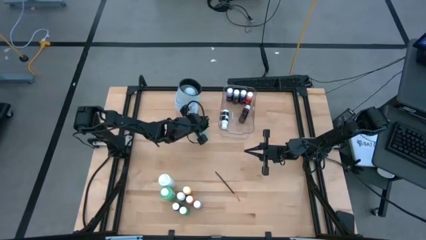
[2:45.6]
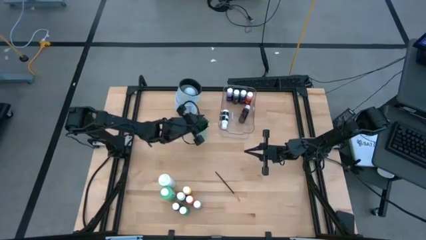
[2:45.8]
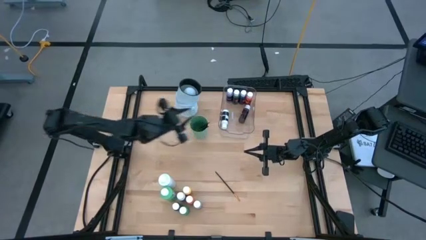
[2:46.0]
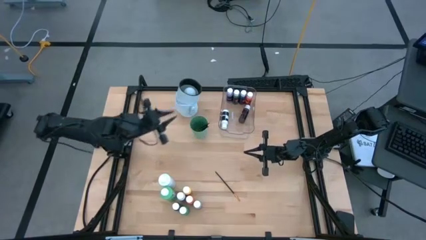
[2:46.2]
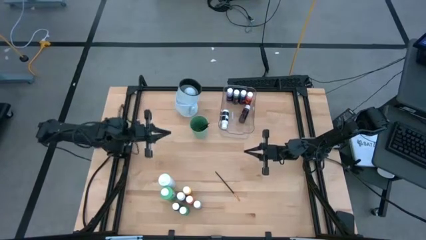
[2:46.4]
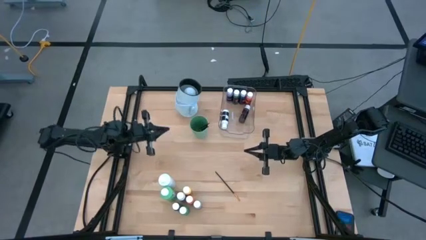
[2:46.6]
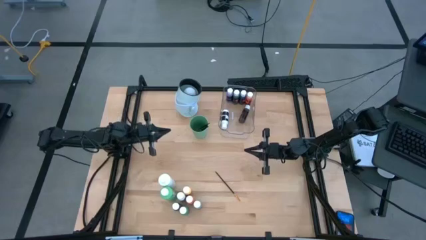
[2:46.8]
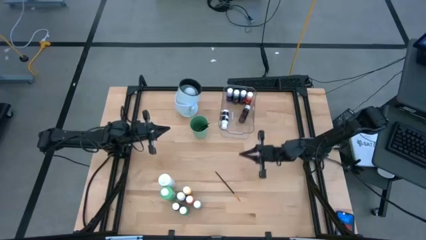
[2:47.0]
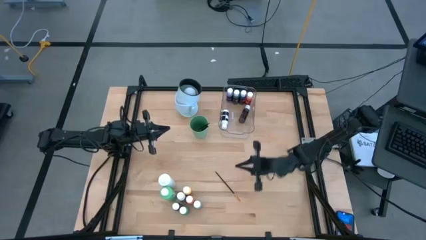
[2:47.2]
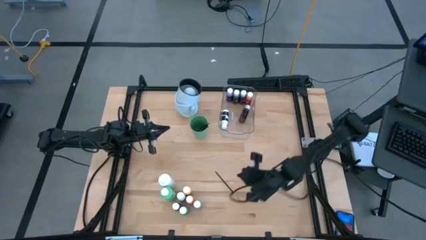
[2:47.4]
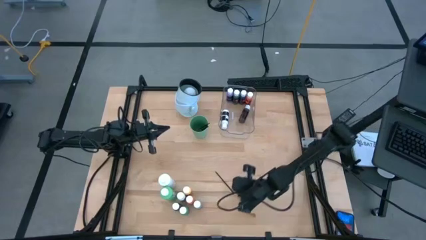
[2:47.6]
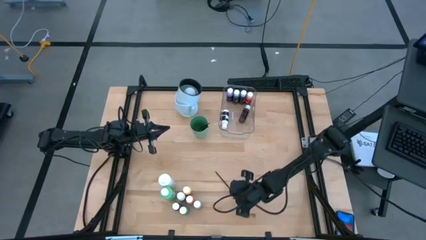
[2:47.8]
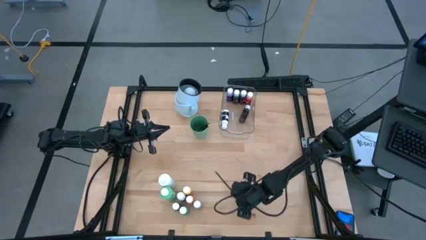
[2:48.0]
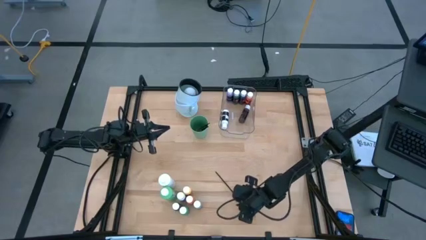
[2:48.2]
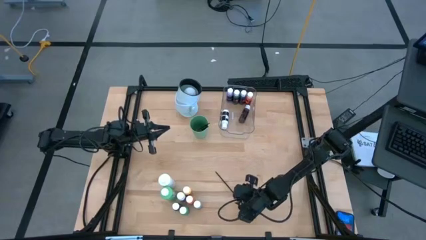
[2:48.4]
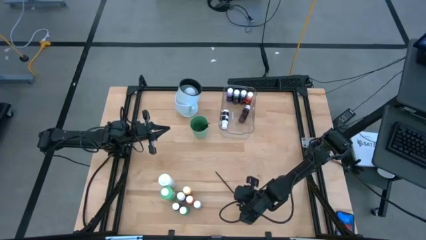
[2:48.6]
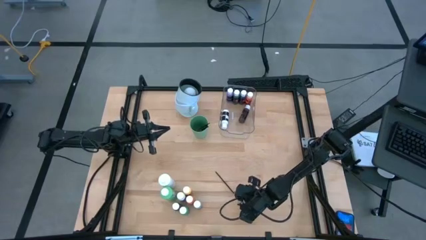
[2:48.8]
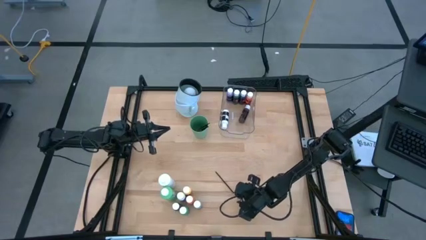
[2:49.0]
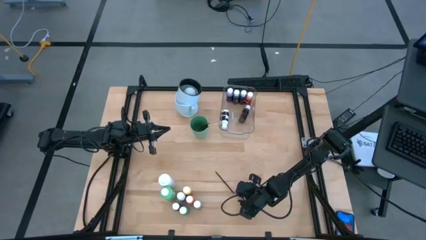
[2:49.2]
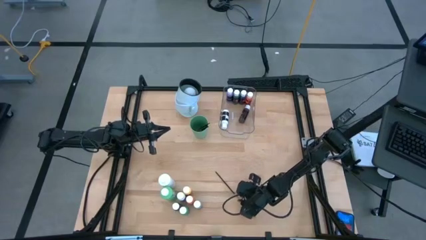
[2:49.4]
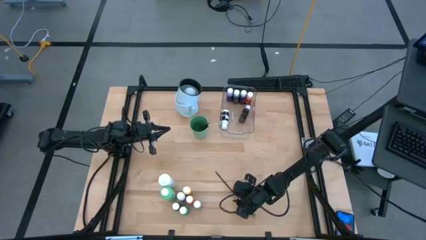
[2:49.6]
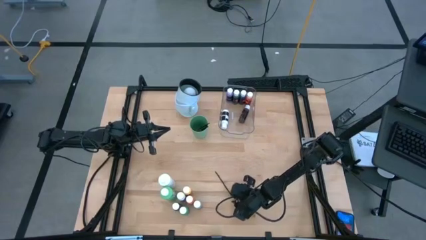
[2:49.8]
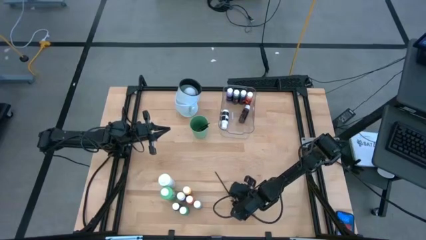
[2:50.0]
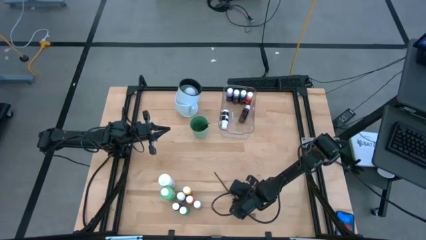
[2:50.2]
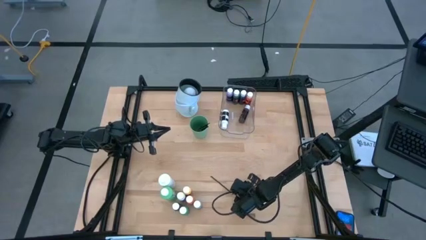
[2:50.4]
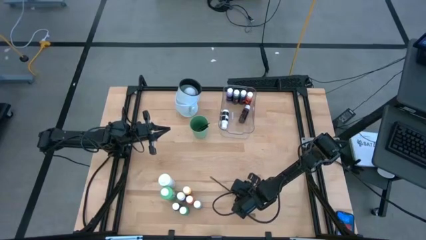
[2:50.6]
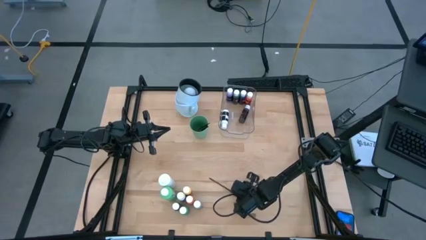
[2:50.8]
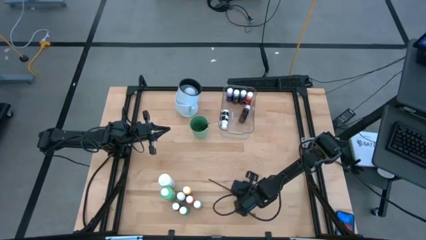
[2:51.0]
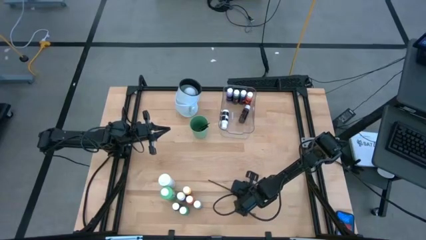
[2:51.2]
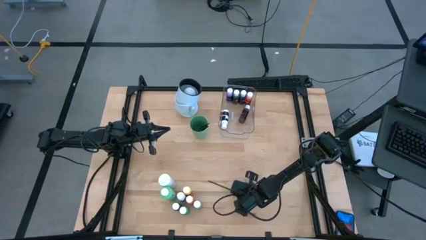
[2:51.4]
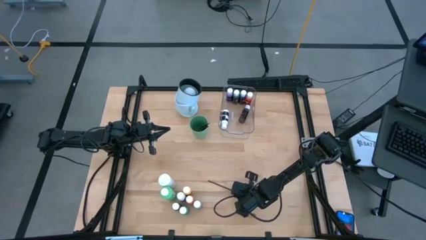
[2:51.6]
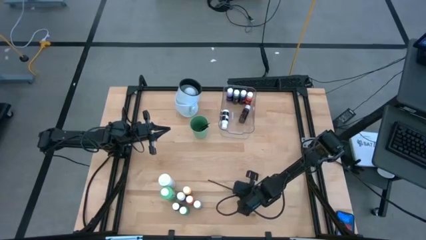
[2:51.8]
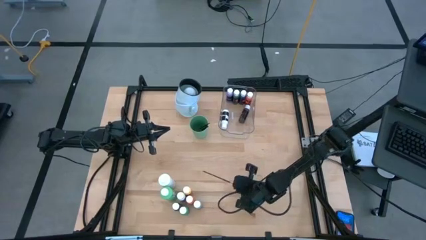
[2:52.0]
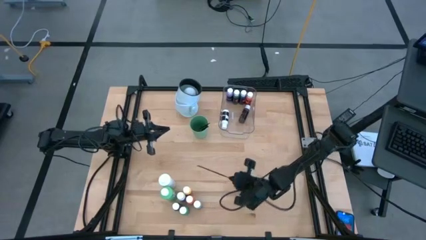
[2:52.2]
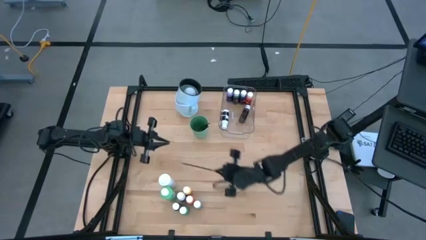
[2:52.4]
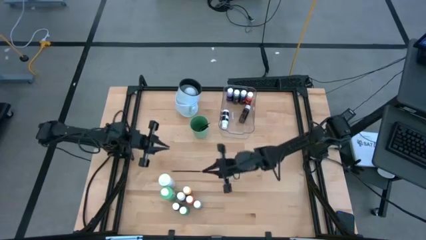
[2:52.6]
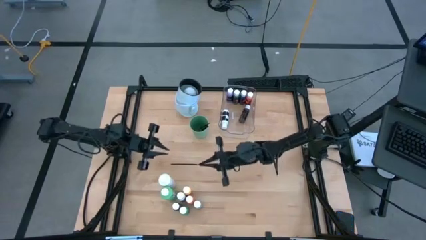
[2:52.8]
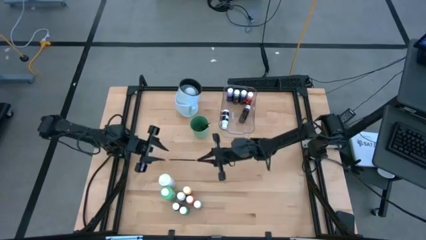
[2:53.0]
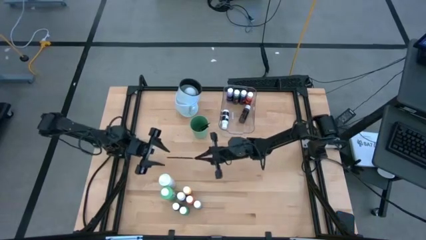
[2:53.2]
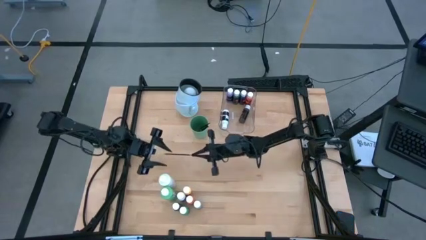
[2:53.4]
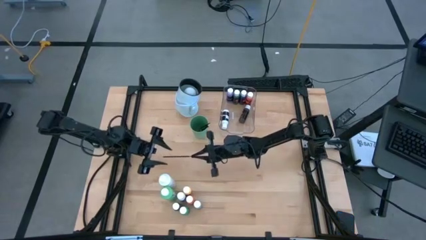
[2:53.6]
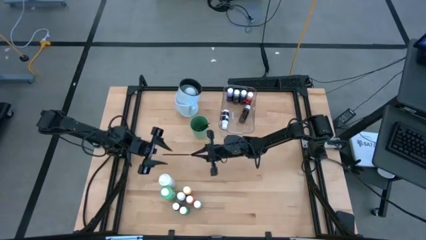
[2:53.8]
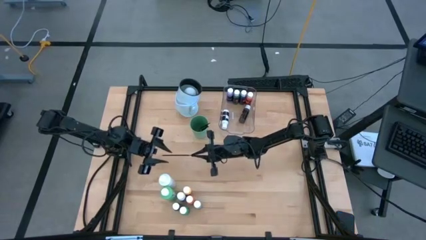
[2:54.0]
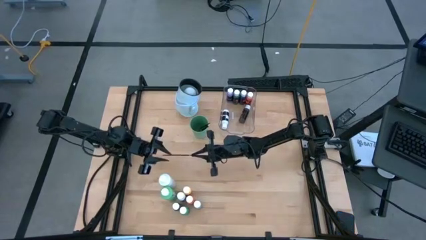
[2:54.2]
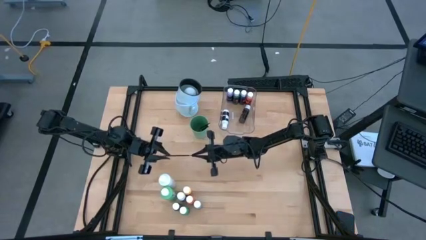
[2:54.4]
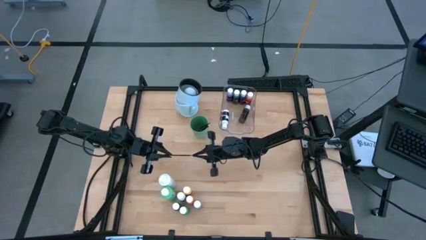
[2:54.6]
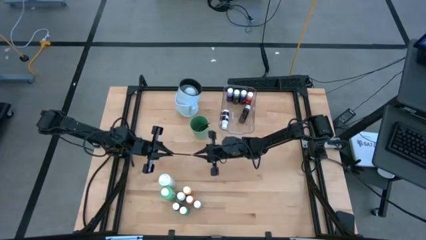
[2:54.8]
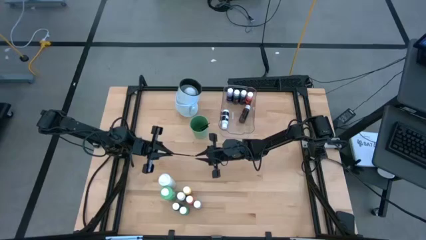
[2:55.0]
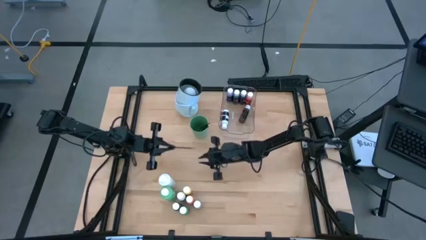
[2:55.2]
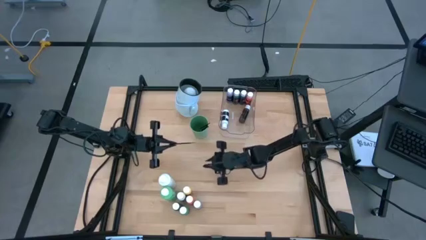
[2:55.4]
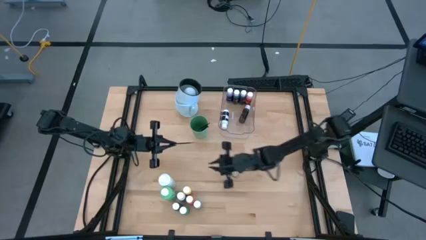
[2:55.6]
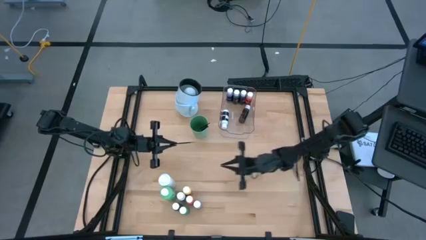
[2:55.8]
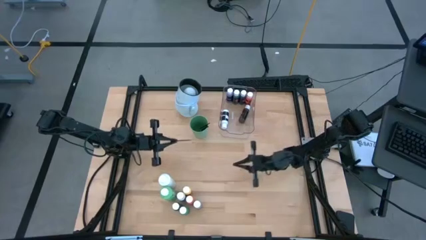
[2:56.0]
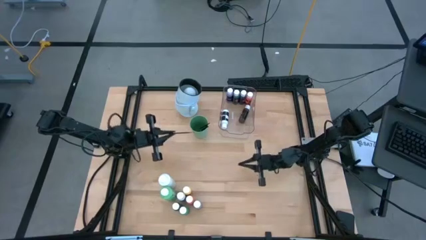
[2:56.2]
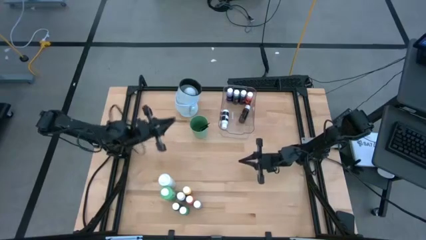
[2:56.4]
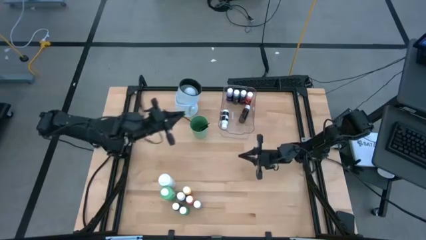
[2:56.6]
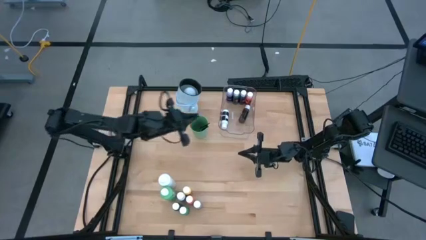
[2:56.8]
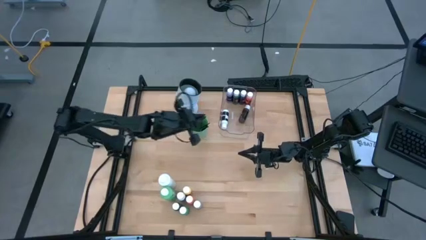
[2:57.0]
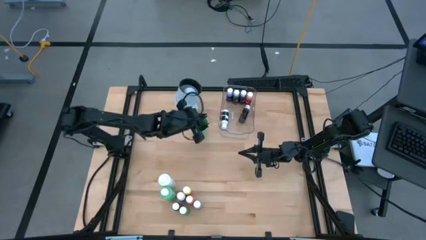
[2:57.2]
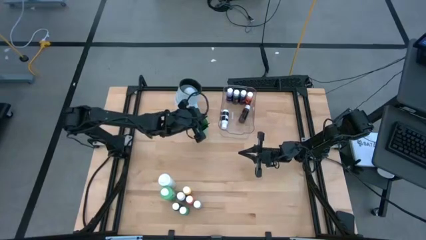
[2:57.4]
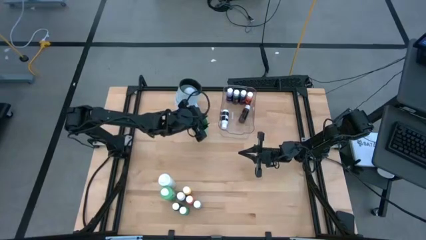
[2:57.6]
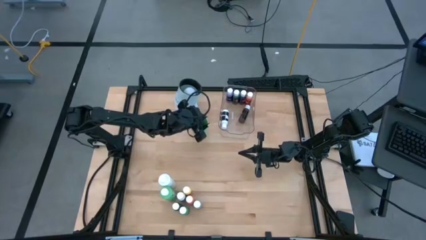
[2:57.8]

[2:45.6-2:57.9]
Task: Pick & Place Paint Supplies
Put the gold paintbrush into the green cup
